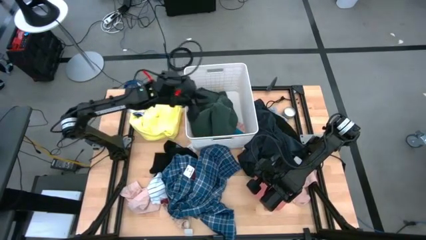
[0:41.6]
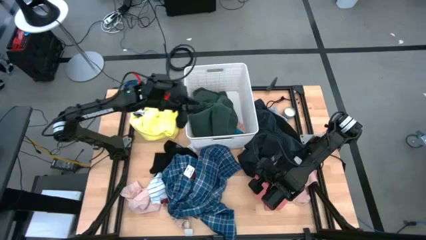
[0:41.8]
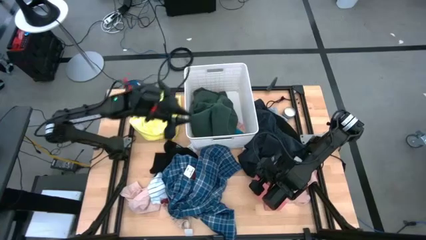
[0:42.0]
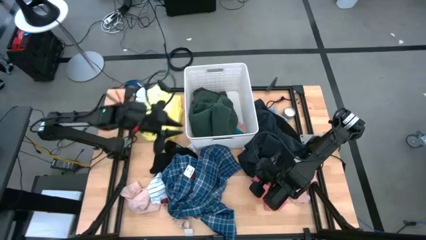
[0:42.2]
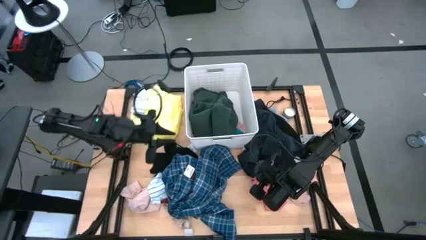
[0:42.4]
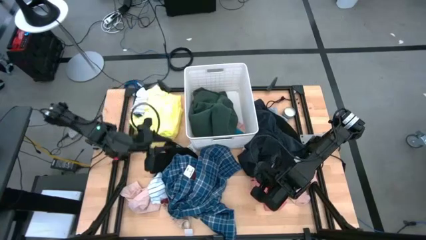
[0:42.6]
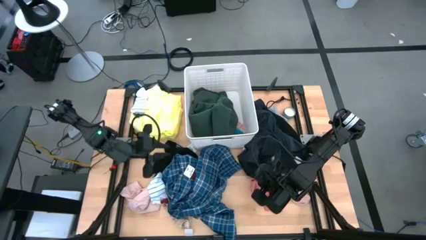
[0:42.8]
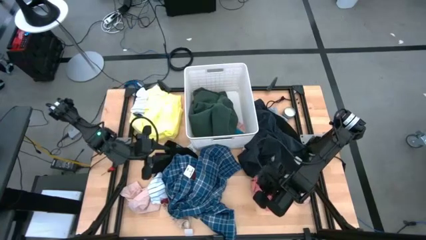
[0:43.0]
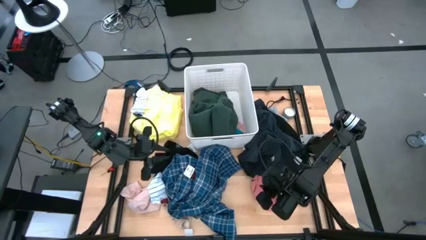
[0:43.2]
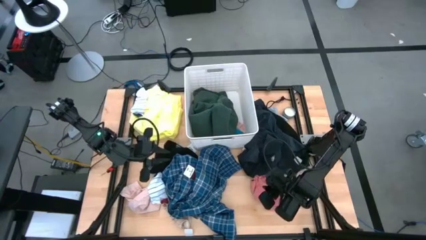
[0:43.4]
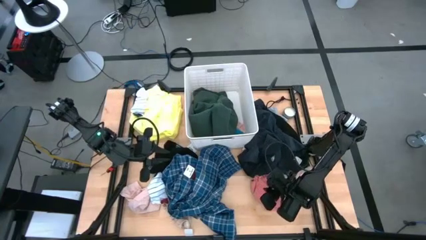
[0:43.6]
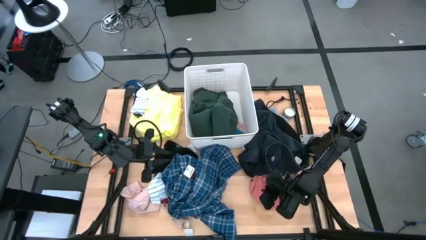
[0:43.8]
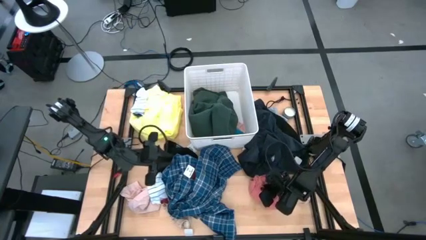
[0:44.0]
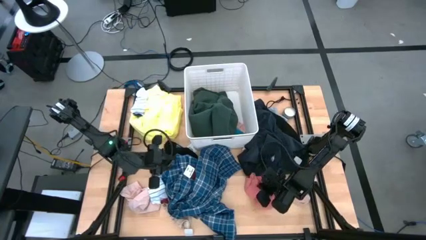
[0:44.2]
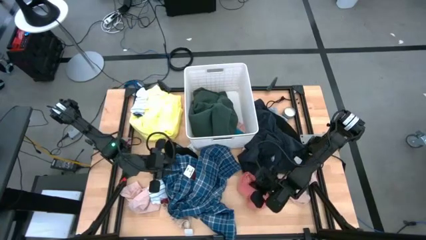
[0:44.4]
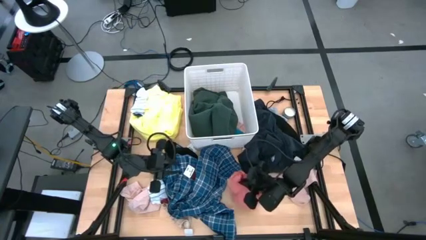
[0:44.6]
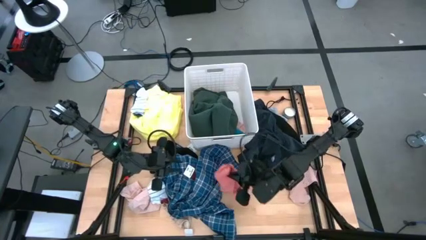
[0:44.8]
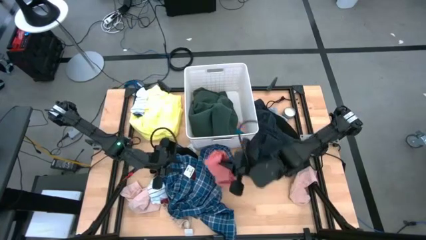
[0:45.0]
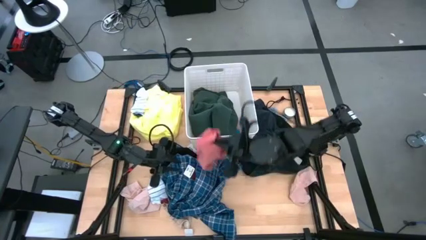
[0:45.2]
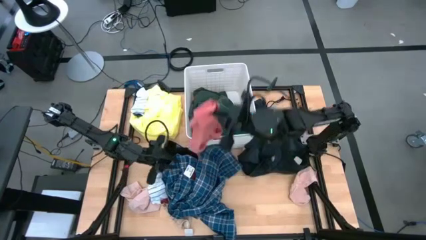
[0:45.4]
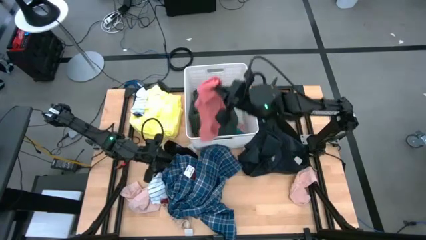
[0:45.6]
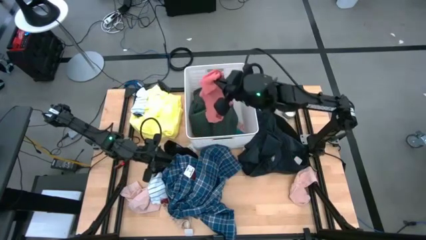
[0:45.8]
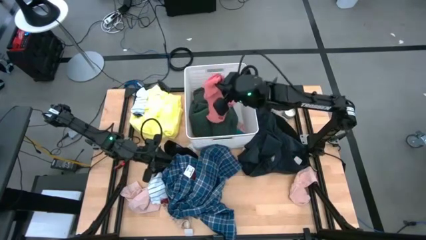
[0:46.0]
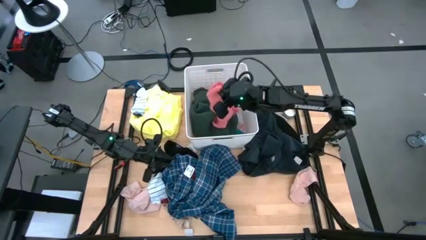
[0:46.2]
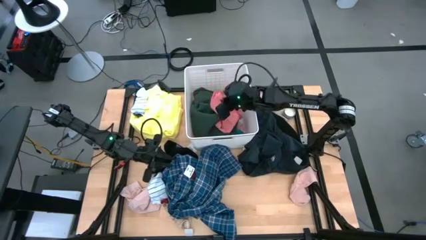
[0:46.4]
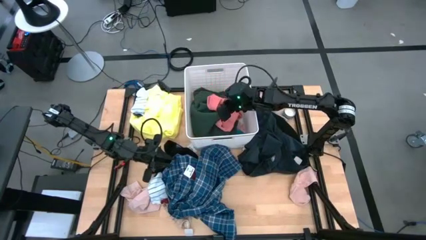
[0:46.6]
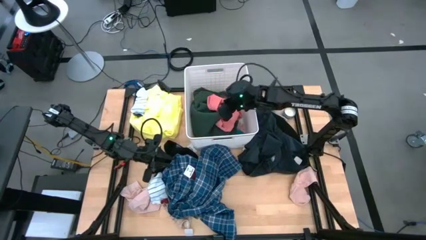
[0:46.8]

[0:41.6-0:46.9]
Task: Sort clothes
Put the pink underwear into the laundry bin

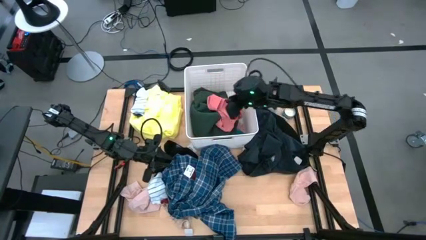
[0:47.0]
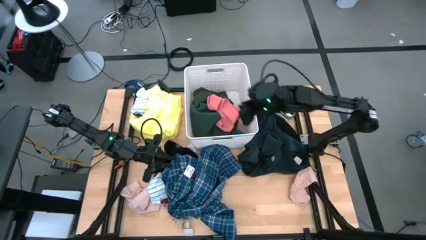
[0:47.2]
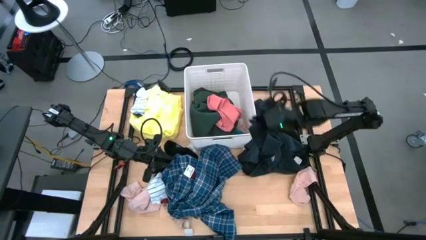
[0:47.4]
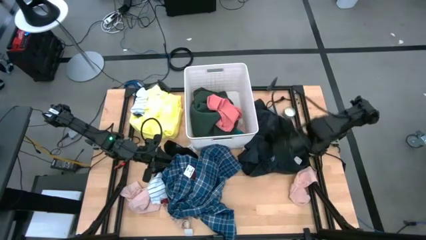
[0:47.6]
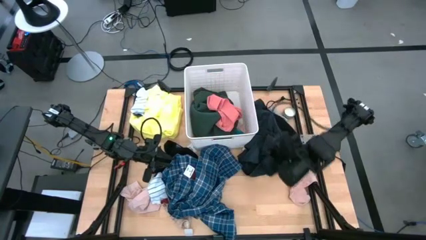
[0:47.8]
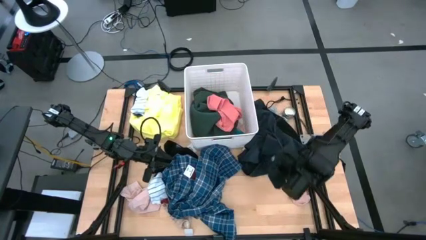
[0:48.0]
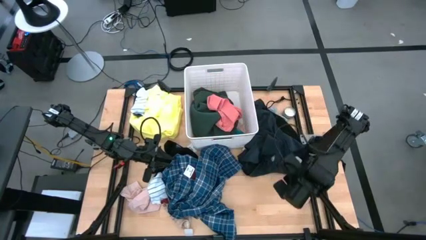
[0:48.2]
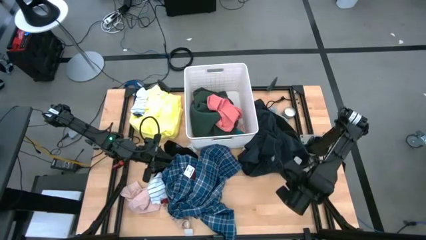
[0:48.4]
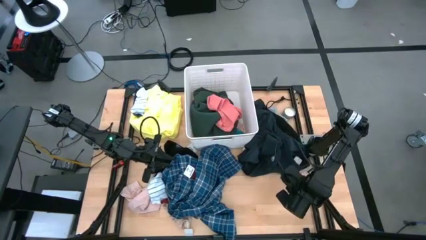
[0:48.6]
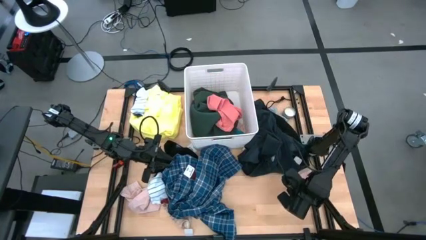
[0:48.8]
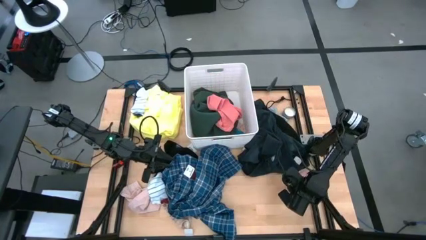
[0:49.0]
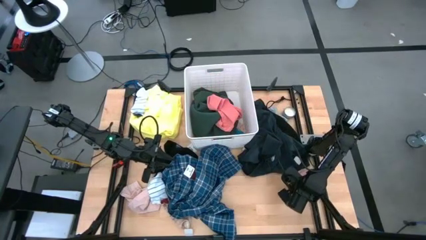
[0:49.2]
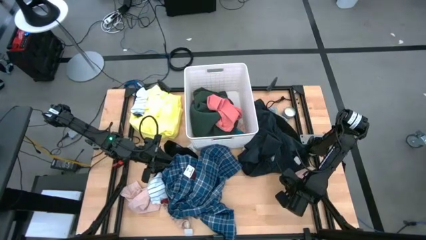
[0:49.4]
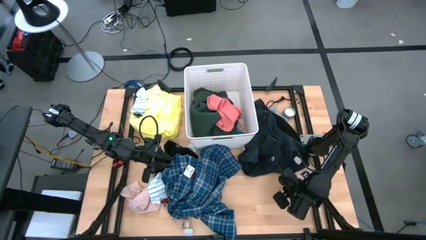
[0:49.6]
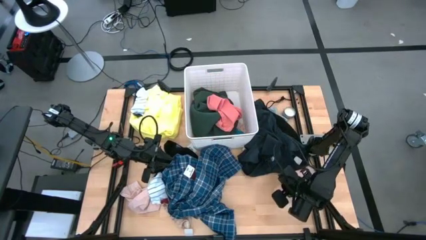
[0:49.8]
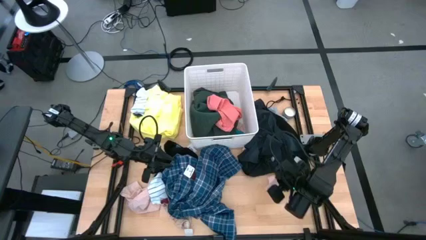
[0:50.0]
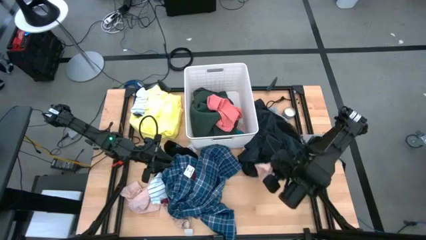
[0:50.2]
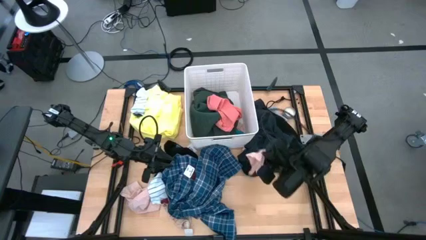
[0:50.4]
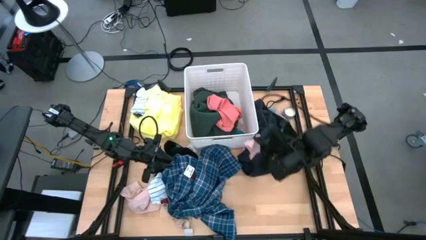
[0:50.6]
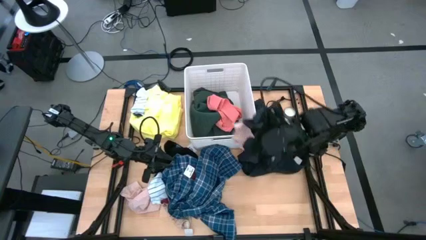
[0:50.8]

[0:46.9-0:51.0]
Put the pink socks into the laundry bin

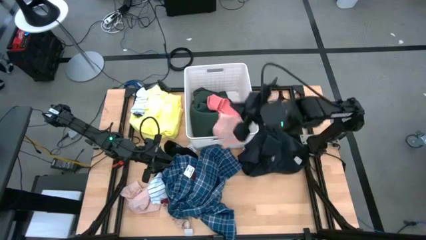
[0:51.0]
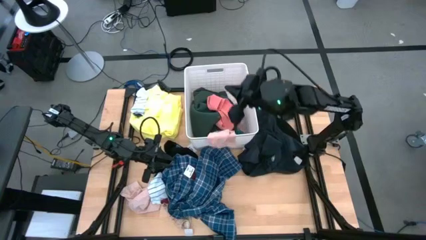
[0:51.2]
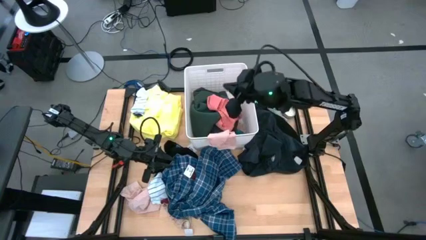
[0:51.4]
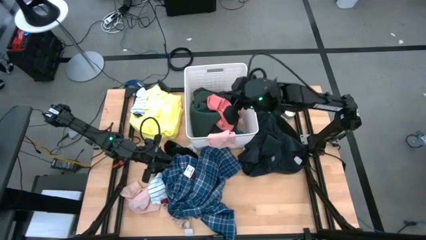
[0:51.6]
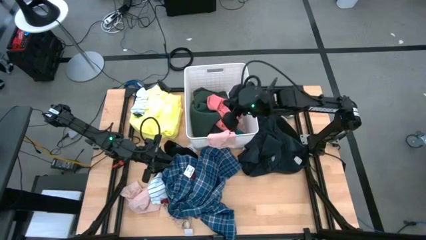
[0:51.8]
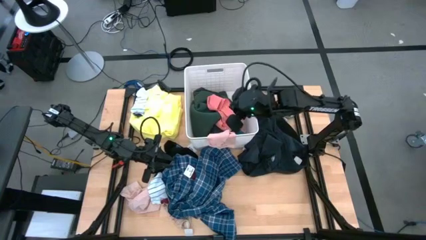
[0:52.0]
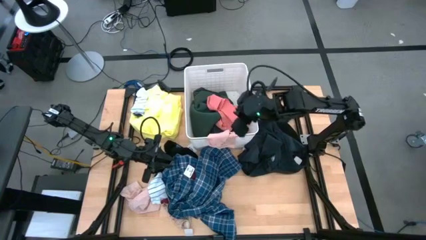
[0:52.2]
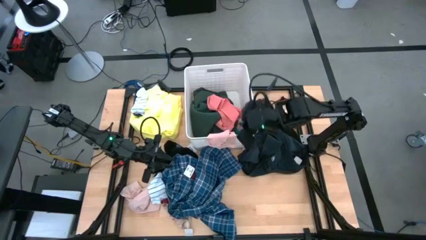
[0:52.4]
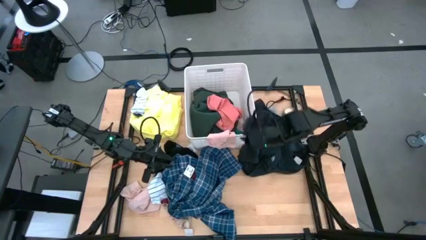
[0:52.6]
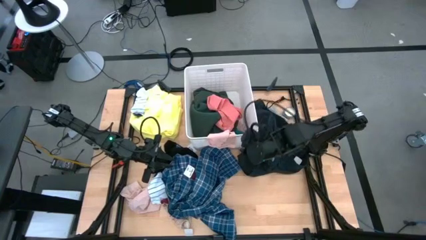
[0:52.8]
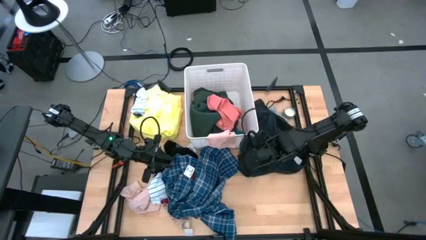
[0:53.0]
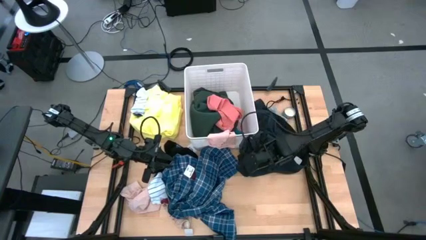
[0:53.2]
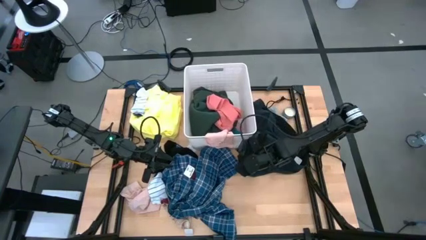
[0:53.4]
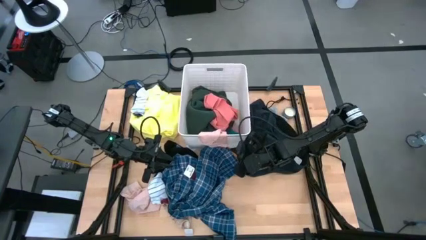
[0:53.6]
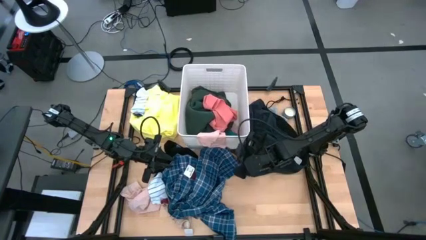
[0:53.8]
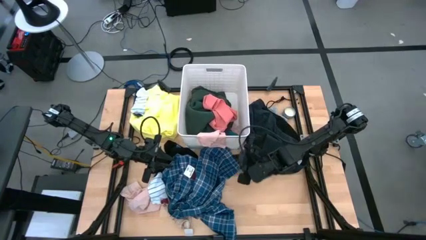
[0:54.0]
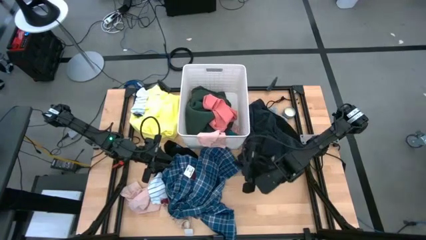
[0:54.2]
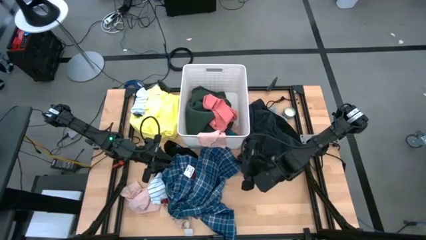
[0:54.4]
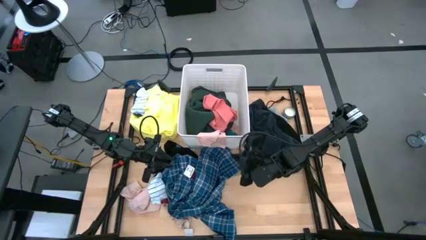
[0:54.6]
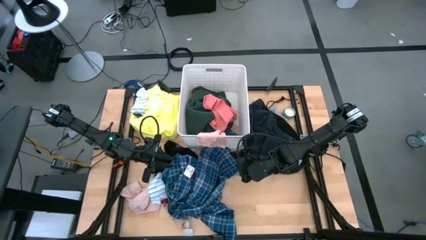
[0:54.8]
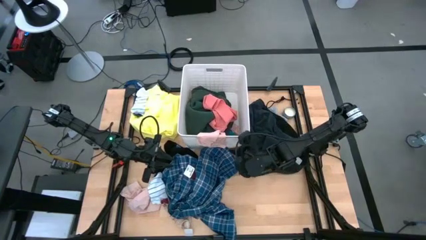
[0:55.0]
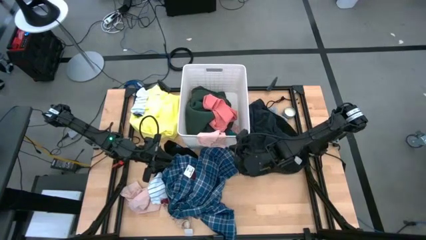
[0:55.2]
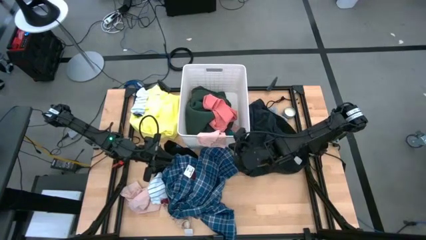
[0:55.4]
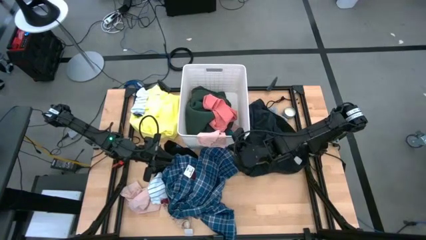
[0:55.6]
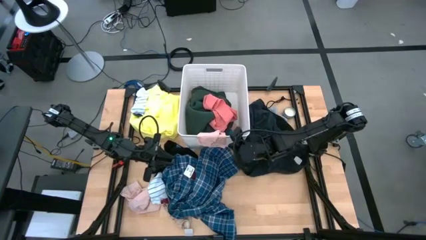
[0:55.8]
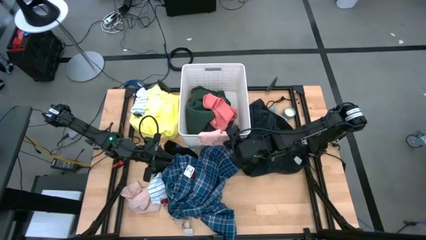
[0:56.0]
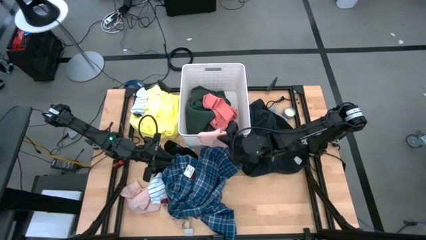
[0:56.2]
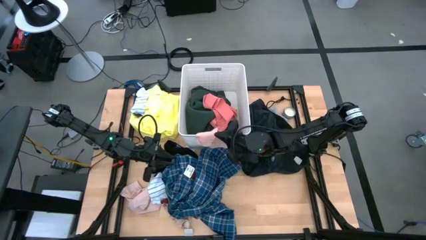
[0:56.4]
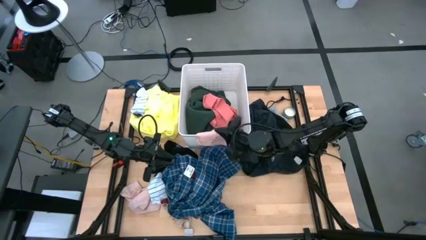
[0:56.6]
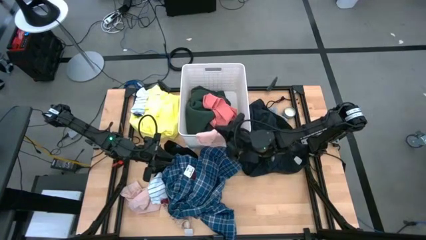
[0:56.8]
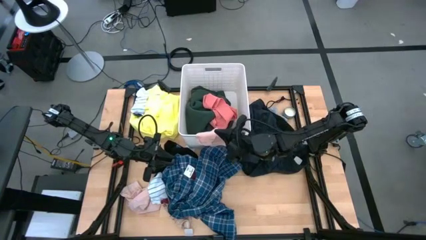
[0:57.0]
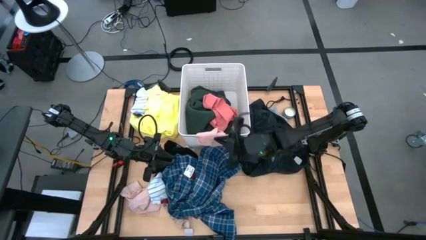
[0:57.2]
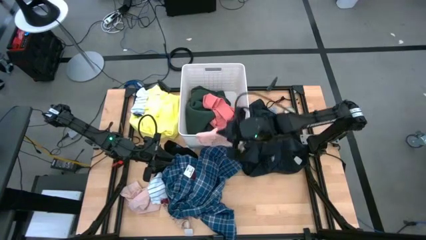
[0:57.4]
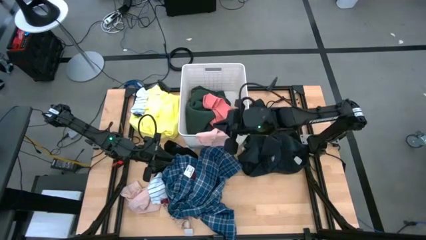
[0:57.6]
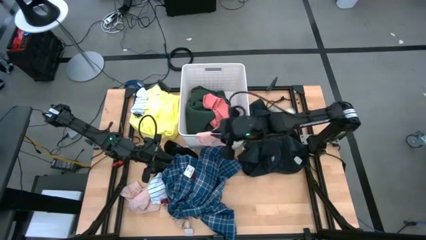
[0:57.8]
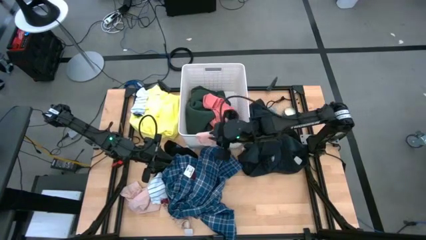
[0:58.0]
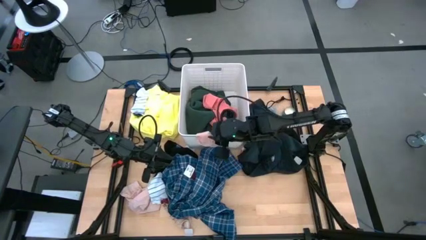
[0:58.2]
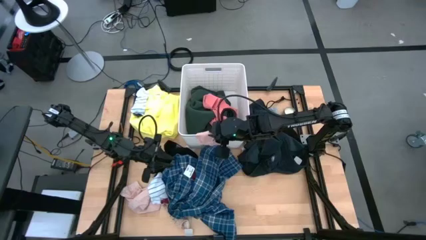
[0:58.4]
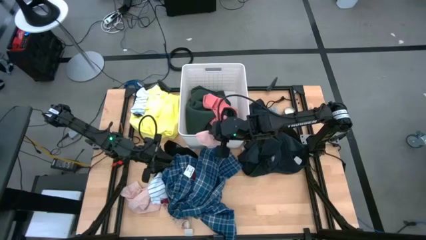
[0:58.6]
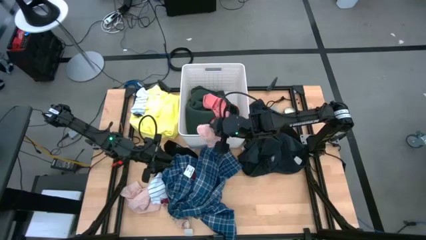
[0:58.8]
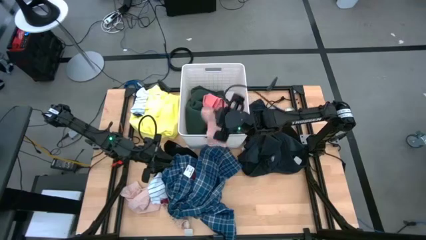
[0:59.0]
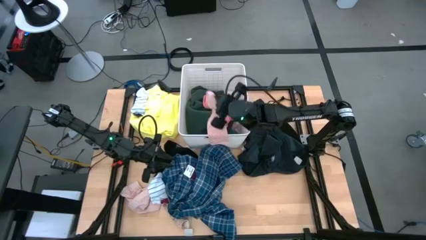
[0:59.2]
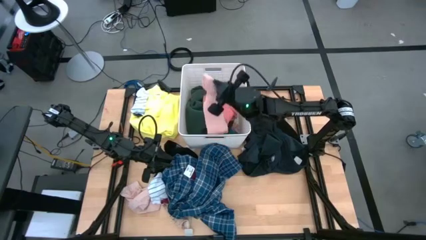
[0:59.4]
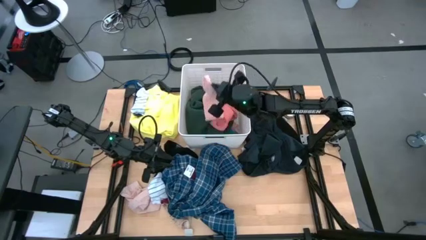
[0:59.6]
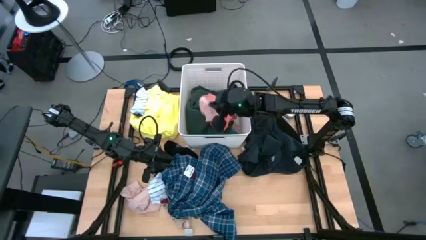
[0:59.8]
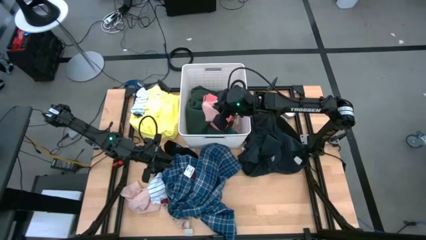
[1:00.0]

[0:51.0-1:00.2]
Put the pink socks into the laundry bin
